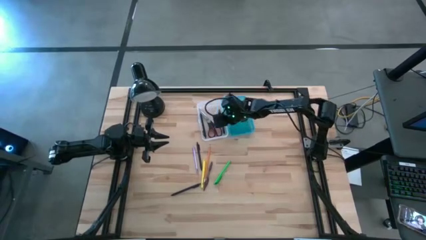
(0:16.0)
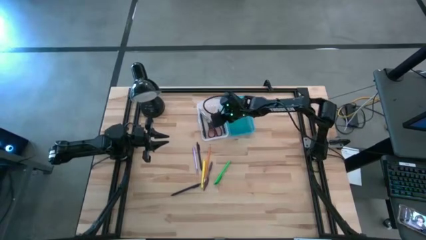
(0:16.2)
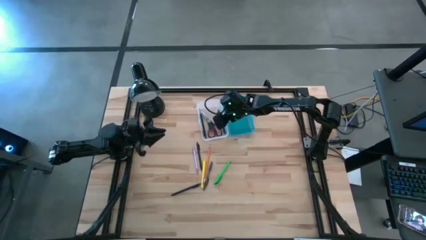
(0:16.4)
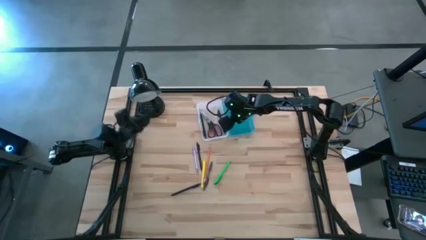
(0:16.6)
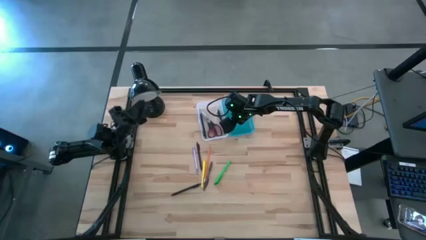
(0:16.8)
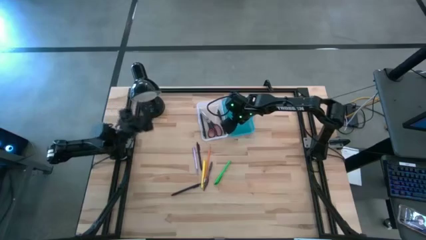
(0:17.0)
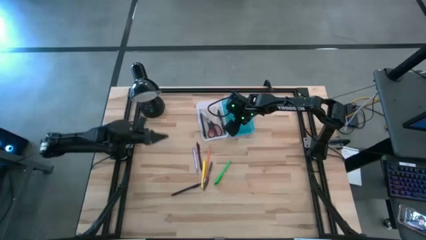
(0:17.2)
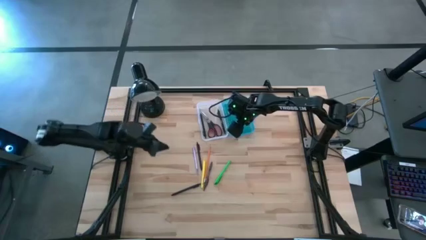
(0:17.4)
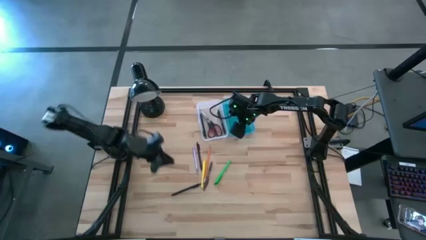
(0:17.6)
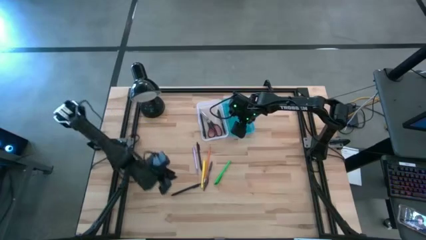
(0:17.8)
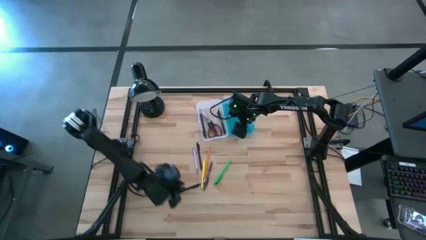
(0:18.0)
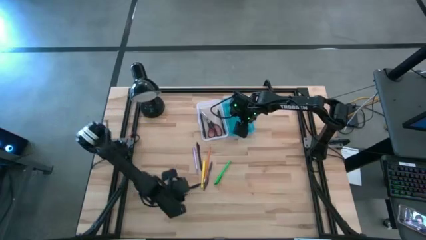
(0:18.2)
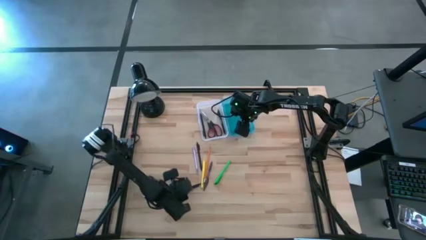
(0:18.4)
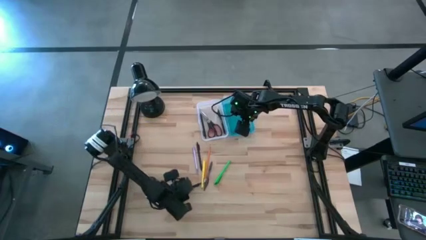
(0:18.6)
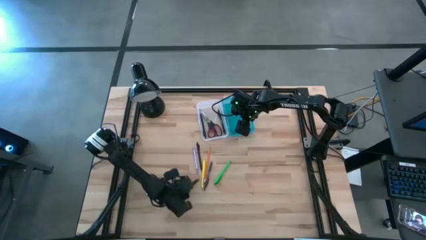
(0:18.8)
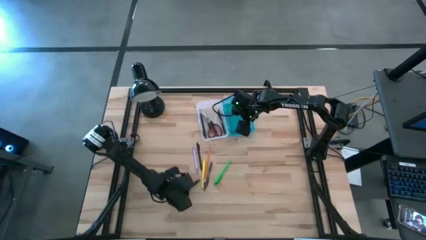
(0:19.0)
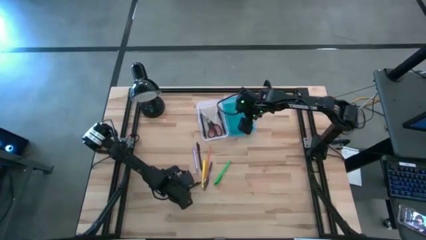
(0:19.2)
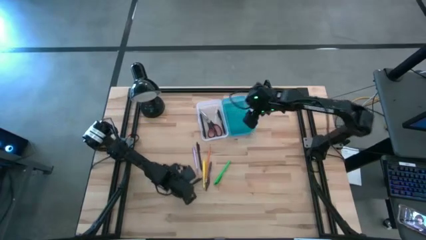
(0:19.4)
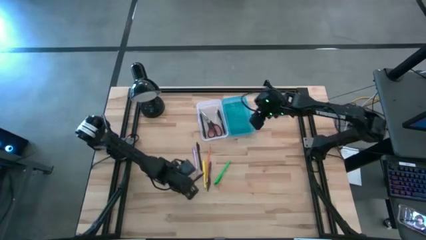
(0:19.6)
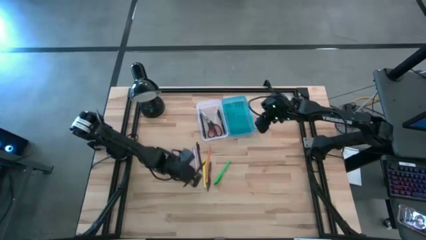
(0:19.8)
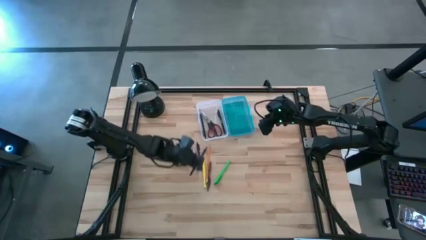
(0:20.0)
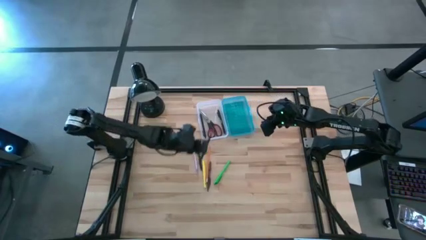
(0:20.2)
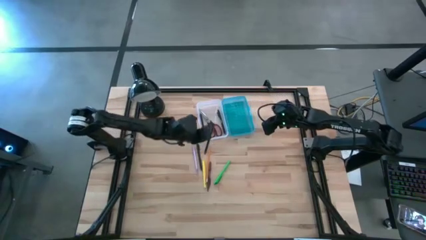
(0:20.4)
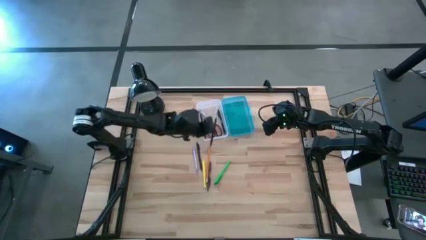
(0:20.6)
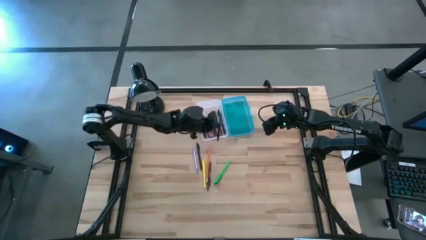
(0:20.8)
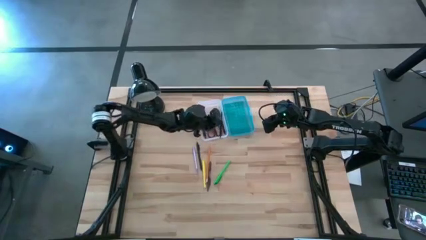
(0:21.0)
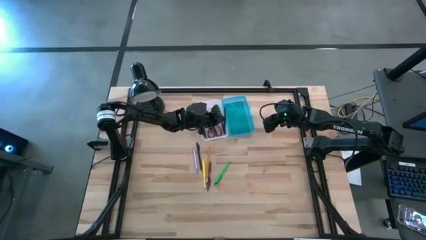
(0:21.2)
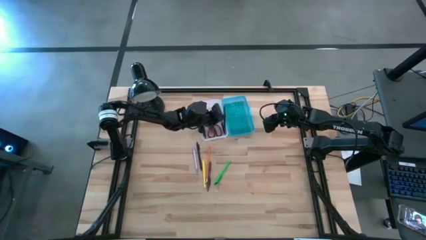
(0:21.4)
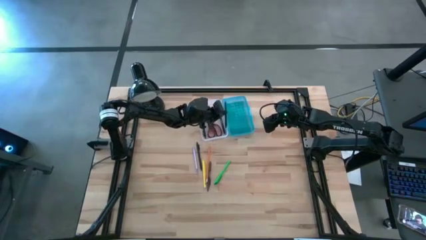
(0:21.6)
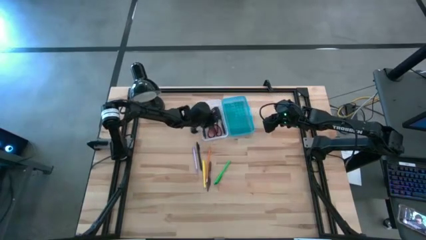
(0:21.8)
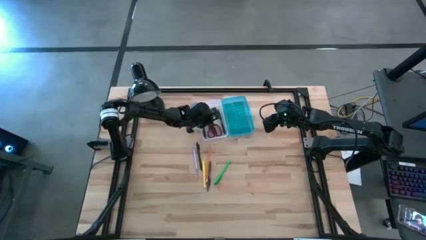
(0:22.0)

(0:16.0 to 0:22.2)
Task: Pick & place school supplies into a supply box
Put the black pen into the blue supply box

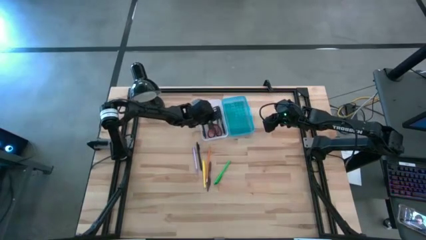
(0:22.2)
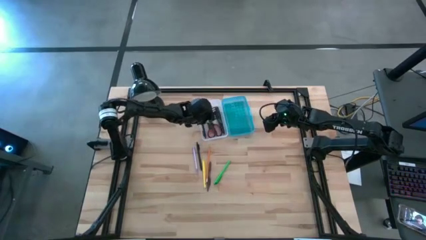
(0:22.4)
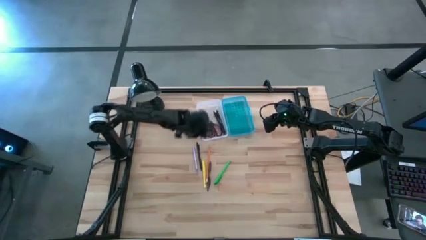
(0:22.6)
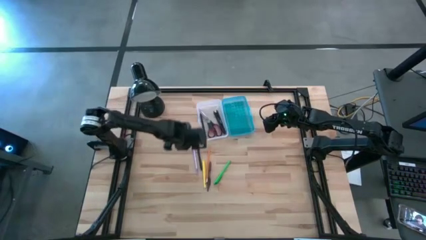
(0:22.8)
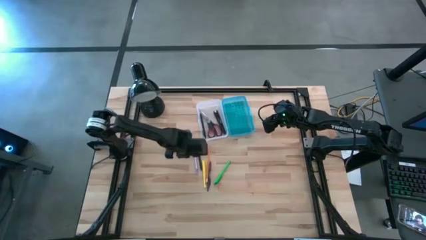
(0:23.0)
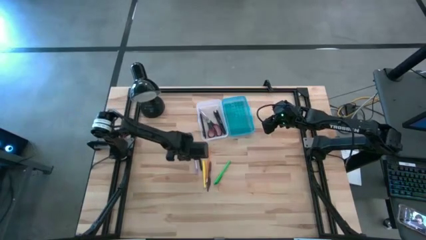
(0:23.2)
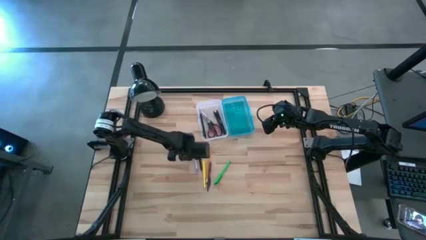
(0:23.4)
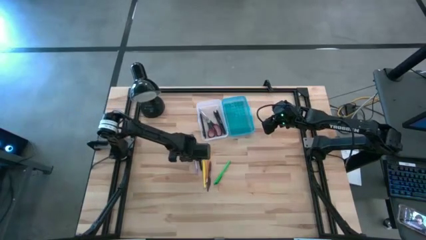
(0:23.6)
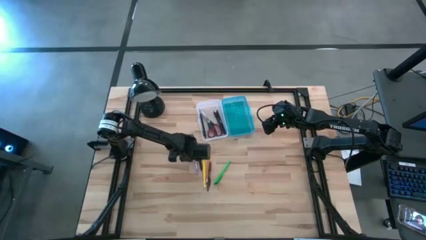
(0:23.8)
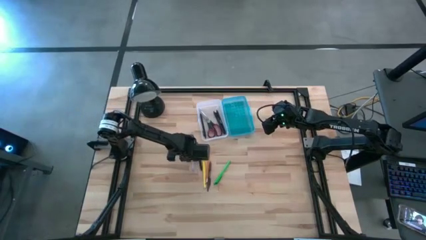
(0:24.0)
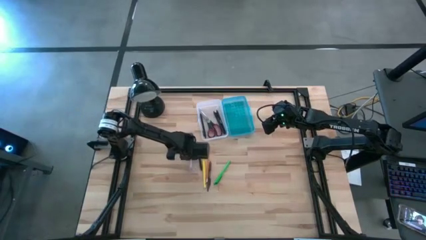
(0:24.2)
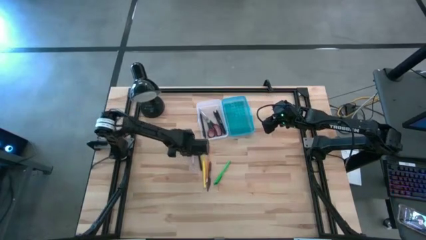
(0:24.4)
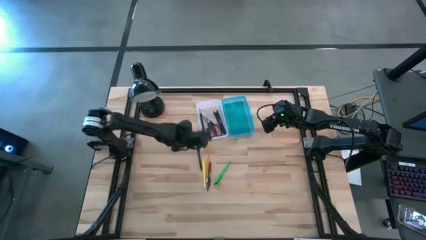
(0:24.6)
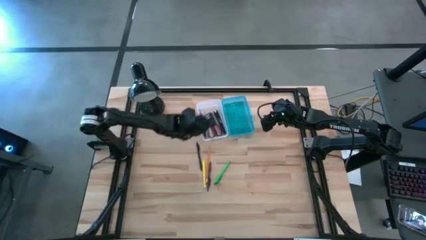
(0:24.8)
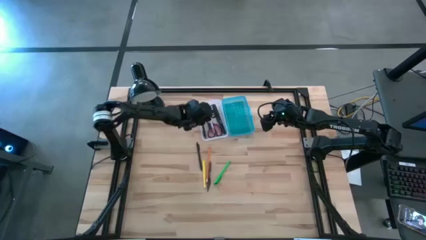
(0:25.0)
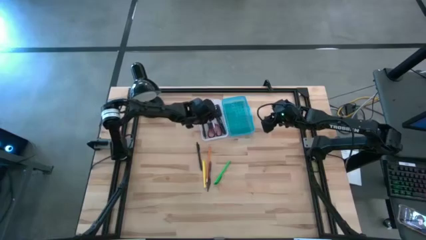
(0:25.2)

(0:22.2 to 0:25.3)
Put the purple pen into the blue supply box

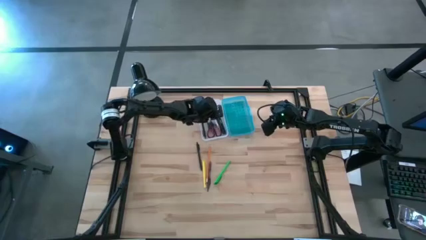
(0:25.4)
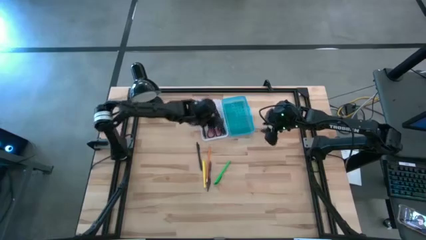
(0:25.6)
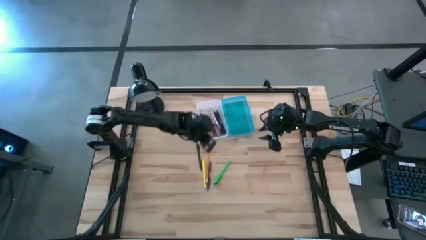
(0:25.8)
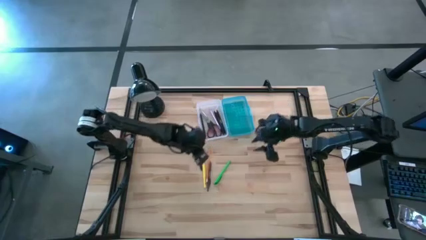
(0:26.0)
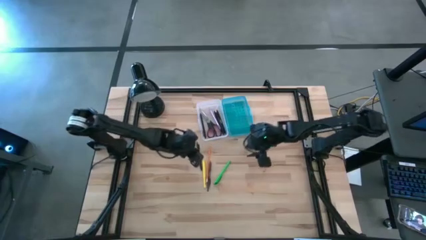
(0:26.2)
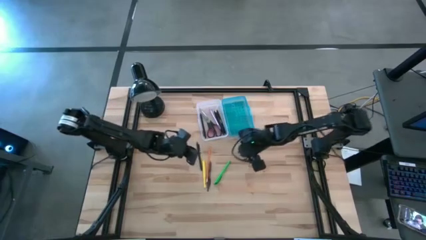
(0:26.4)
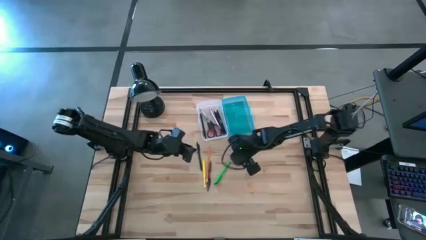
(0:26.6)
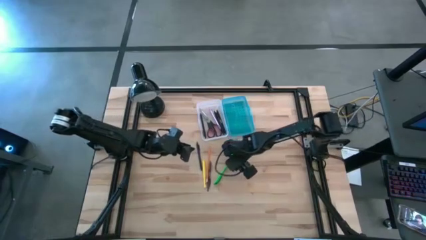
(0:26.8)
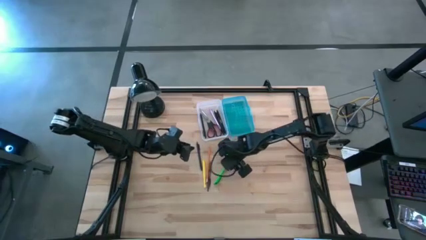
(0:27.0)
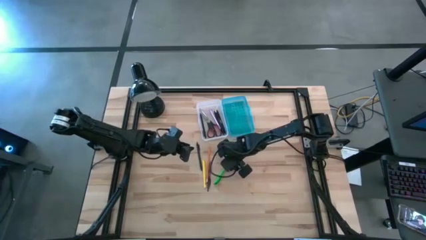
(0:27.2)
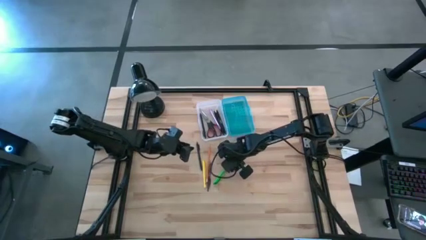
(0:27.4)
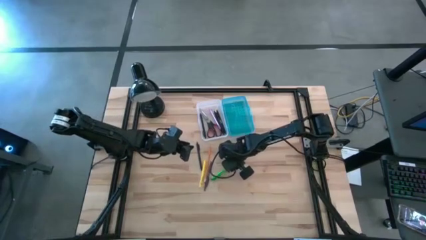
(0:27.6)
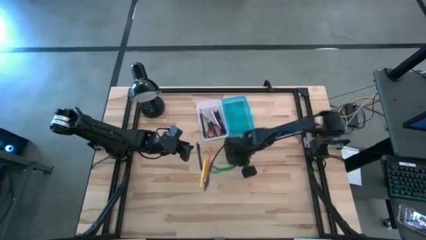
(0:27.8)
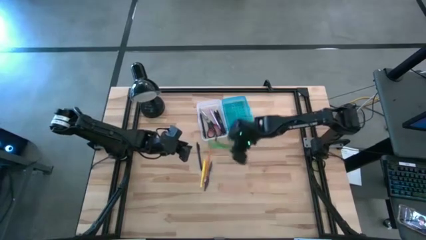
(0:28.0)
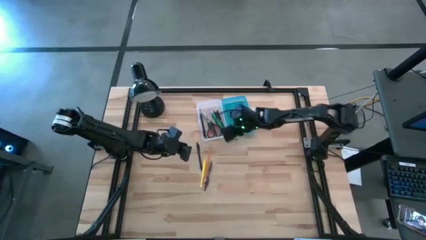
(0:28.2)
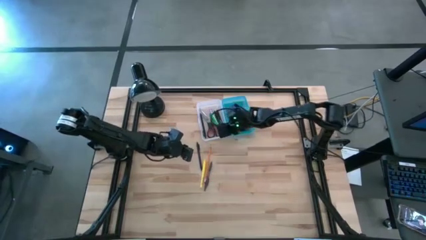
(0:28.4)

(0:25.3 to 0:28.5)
Put the green pen into the blue supply box

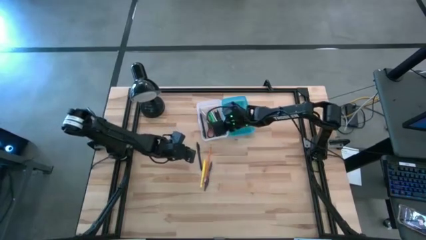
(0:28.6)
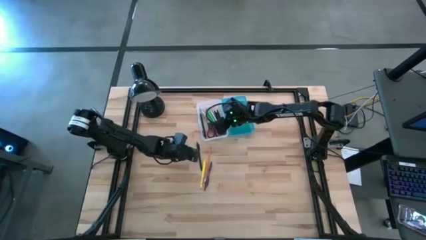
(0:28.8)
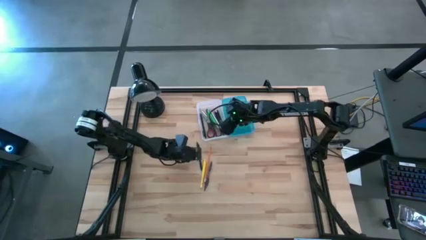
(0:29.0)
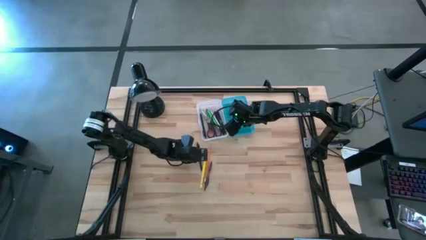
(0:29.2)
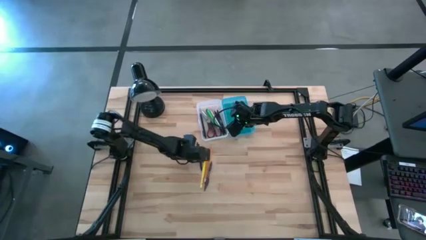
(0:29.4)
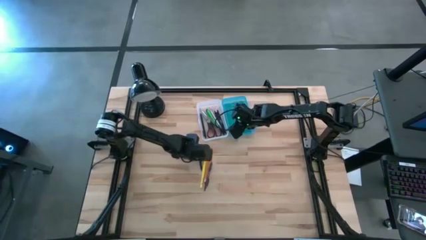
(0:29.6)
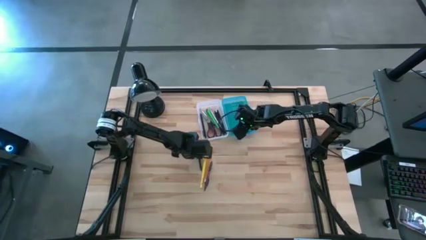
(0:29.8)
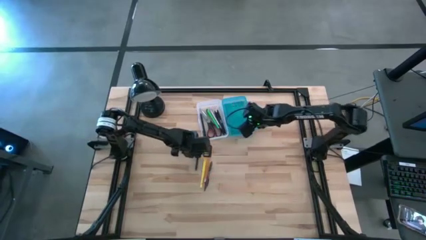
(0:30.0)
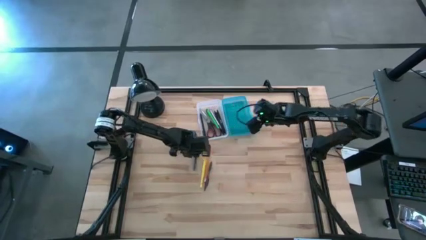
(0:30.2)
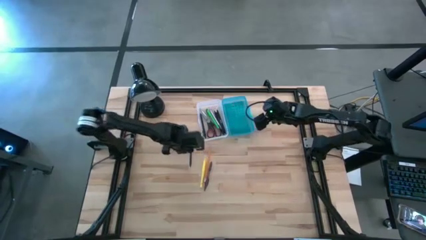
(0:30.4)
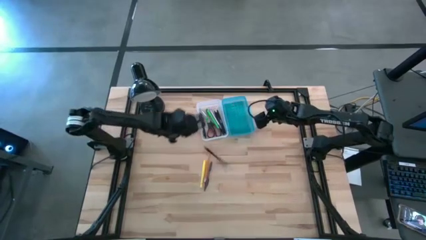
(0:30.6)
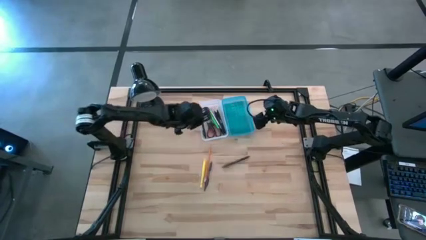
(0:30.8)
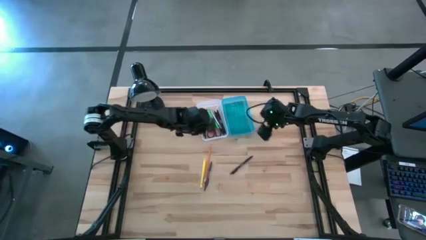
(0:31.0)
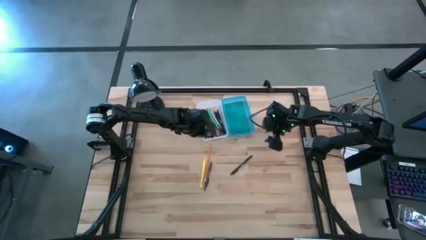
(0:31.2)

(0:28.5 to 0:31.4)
Put the black pen into the blue supply box

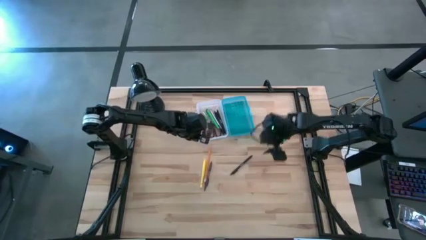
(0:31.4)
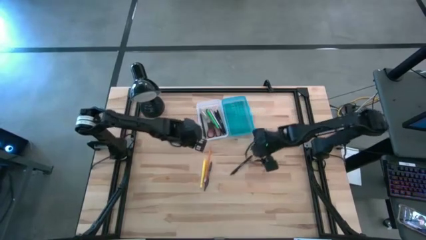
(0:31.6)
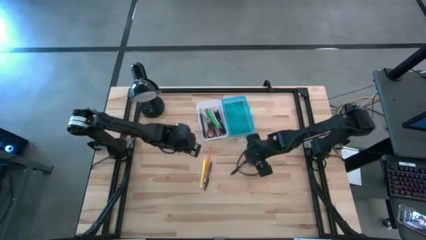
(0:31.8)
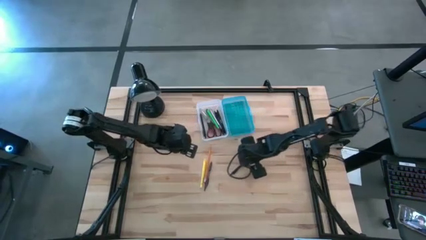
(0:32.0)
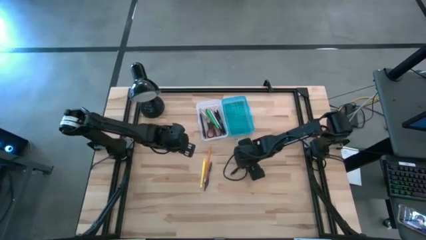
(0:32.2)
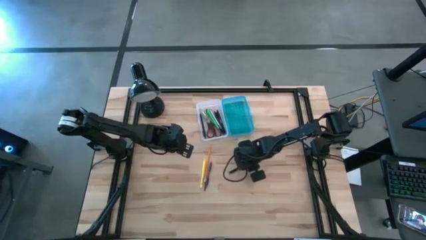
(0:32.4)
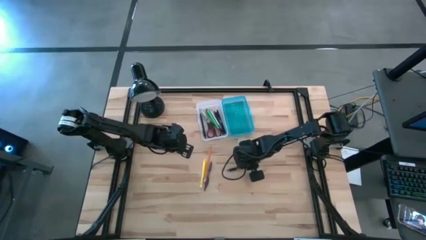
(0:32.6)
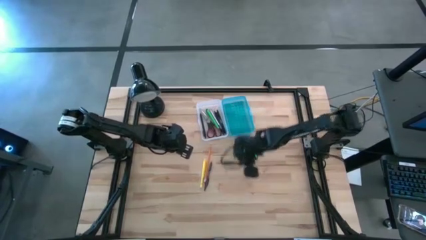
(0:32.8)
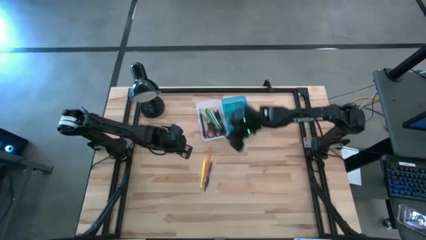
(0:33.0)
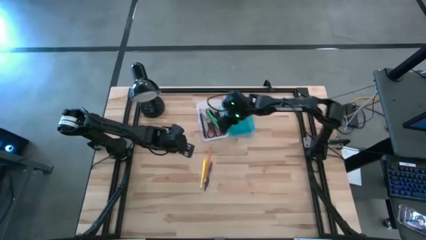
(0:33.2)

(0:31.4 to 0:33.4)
Put the black pen into the blue supply box
